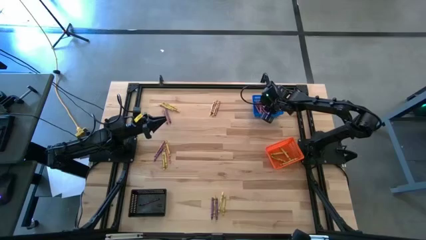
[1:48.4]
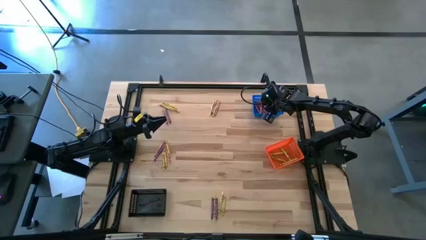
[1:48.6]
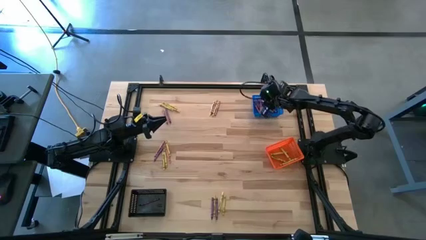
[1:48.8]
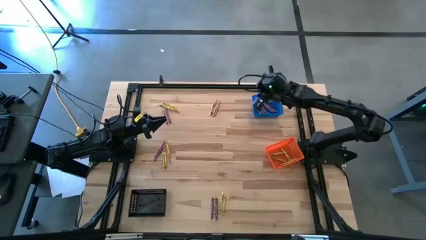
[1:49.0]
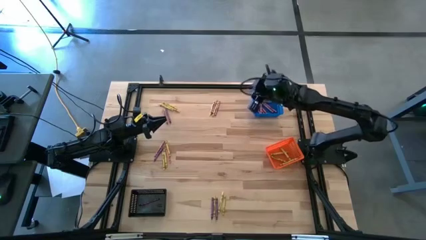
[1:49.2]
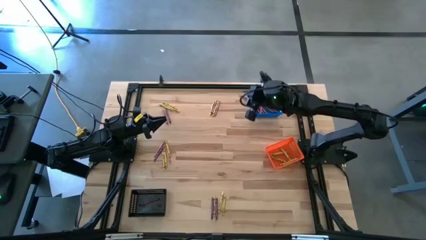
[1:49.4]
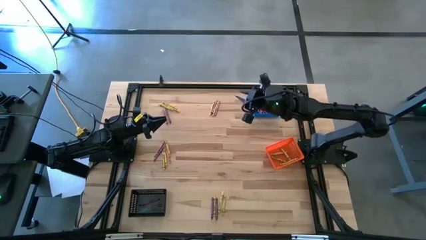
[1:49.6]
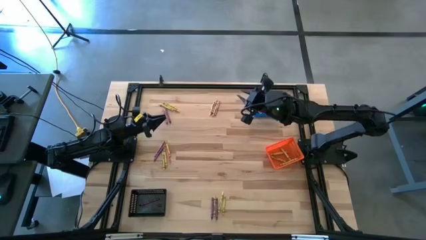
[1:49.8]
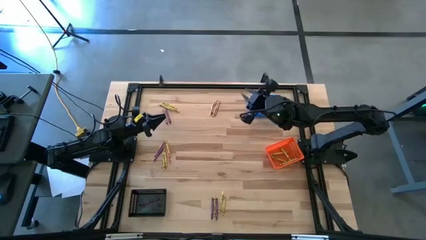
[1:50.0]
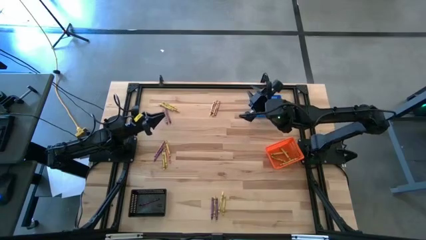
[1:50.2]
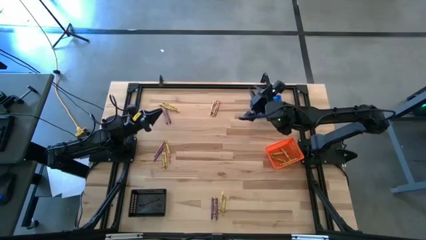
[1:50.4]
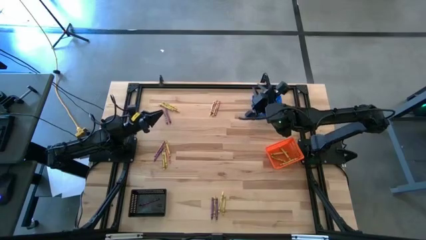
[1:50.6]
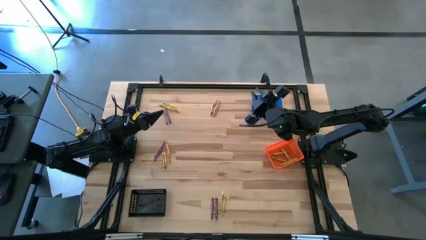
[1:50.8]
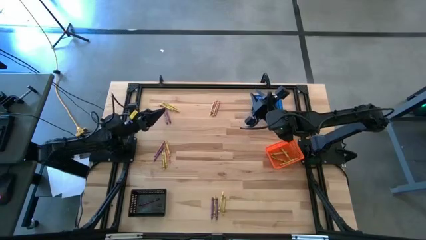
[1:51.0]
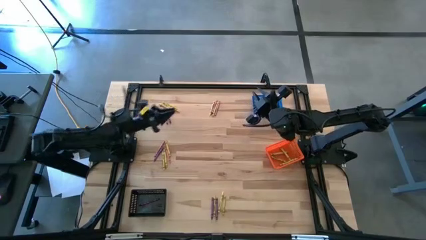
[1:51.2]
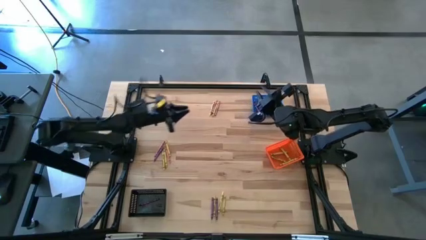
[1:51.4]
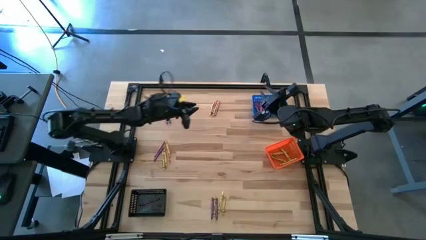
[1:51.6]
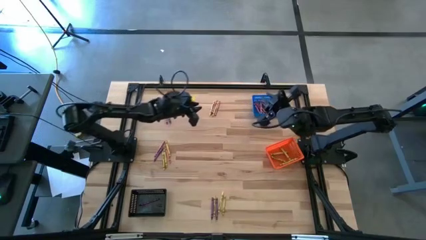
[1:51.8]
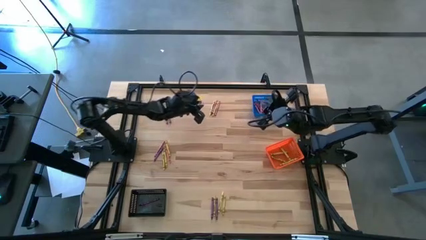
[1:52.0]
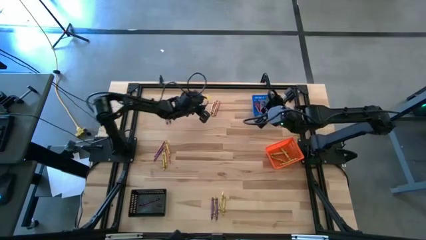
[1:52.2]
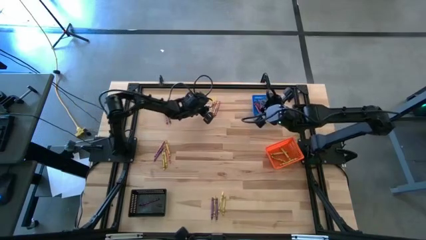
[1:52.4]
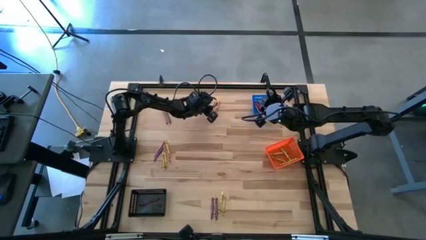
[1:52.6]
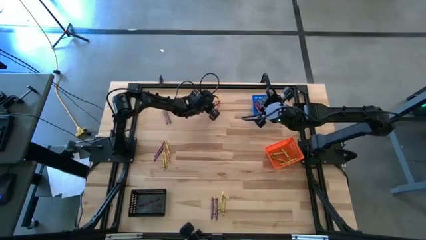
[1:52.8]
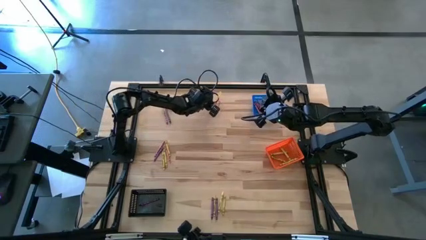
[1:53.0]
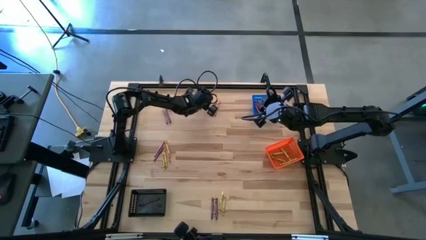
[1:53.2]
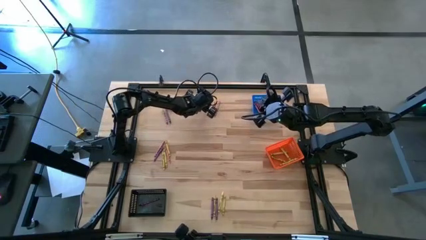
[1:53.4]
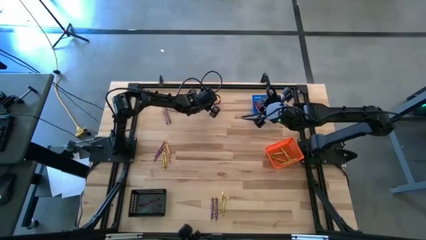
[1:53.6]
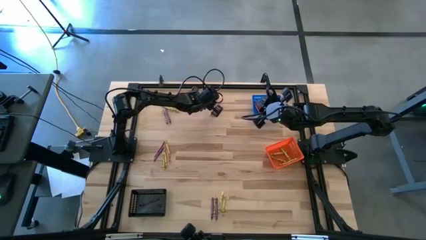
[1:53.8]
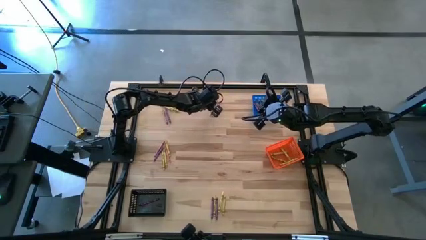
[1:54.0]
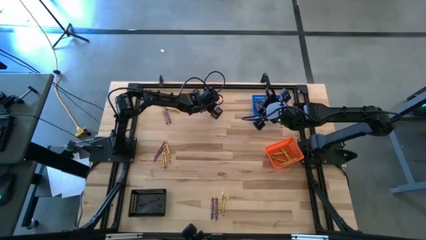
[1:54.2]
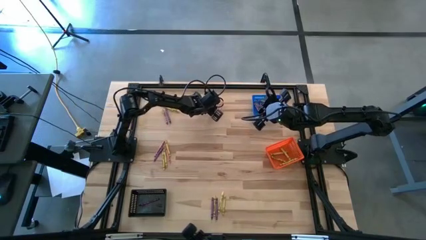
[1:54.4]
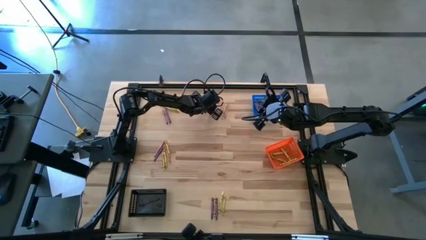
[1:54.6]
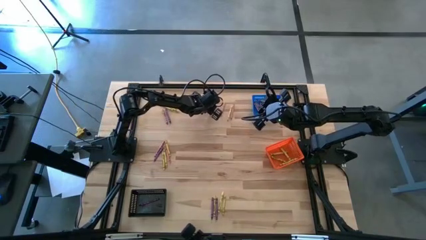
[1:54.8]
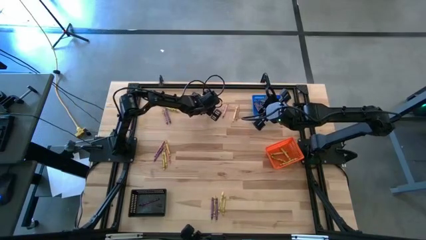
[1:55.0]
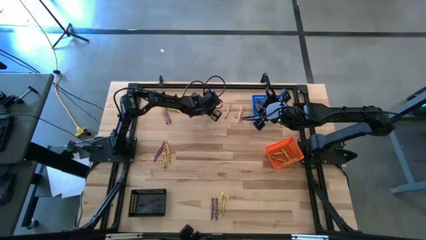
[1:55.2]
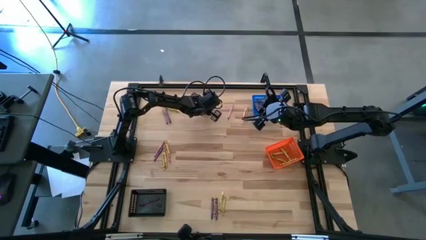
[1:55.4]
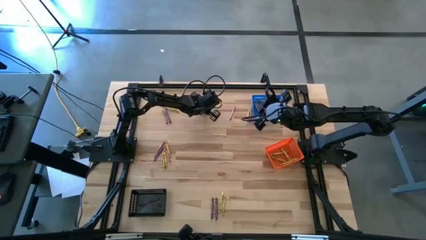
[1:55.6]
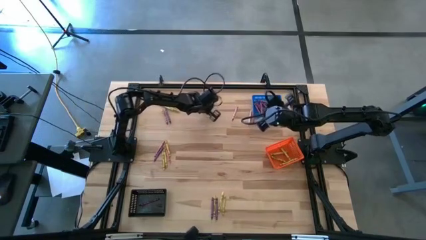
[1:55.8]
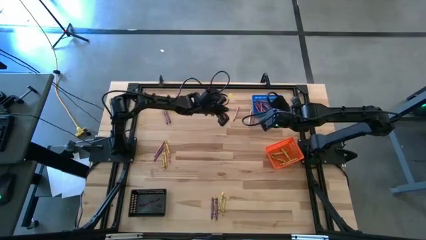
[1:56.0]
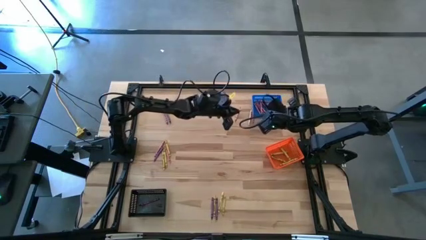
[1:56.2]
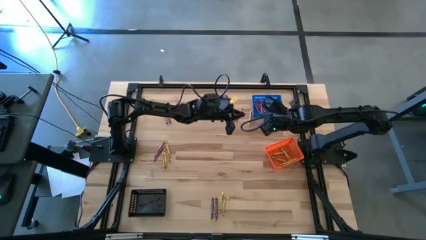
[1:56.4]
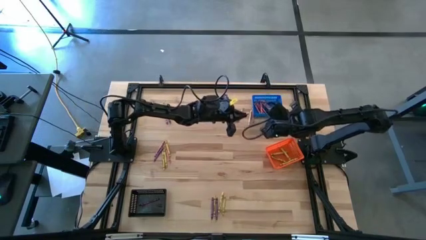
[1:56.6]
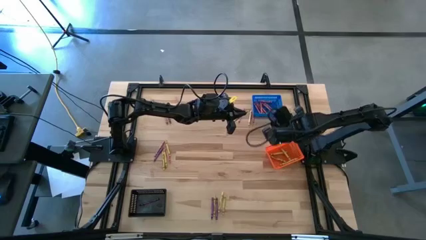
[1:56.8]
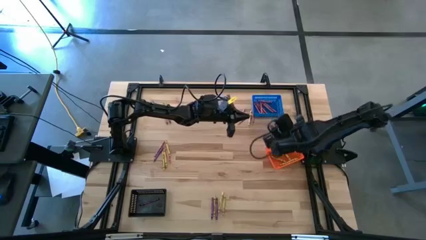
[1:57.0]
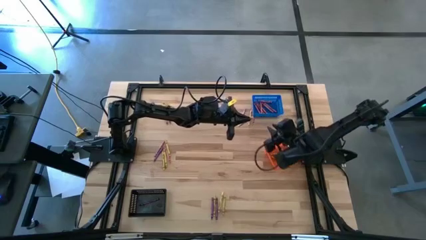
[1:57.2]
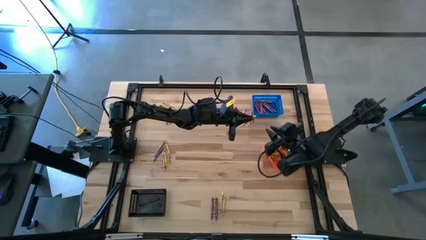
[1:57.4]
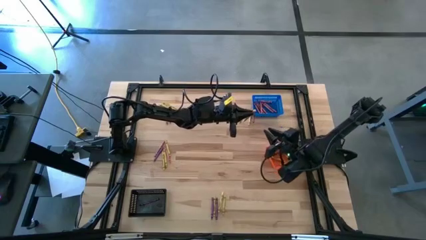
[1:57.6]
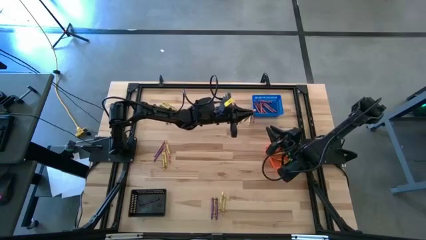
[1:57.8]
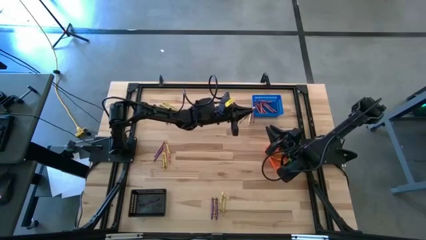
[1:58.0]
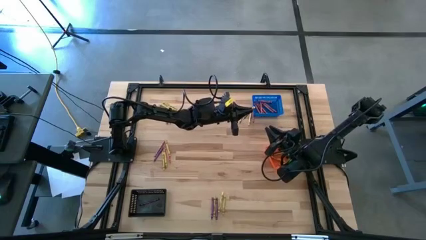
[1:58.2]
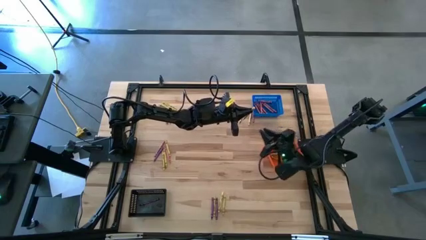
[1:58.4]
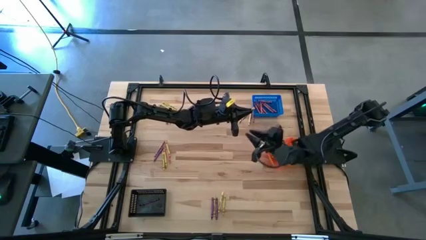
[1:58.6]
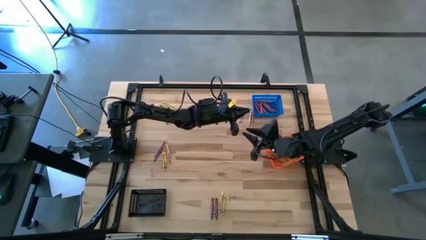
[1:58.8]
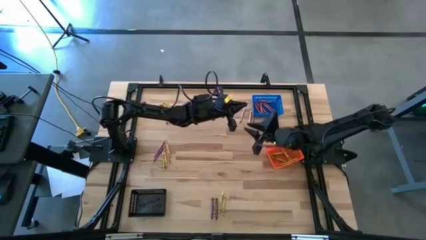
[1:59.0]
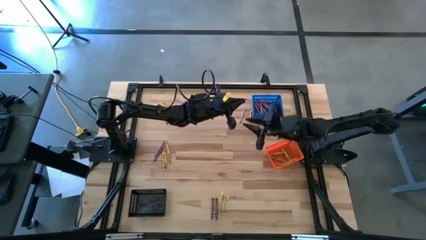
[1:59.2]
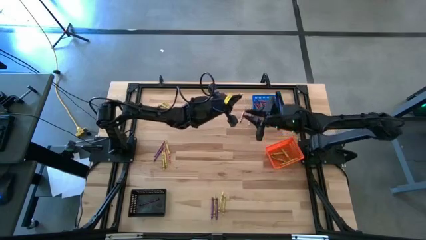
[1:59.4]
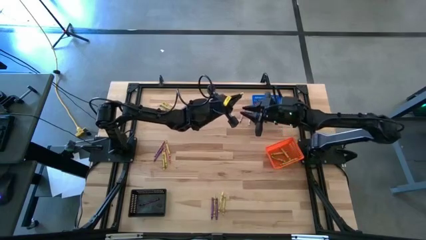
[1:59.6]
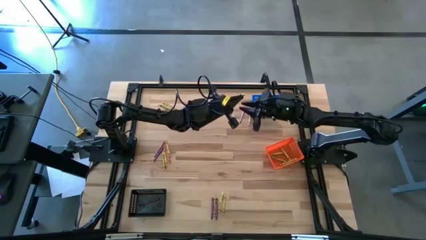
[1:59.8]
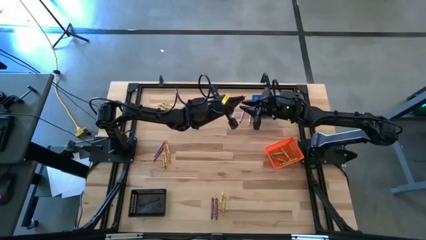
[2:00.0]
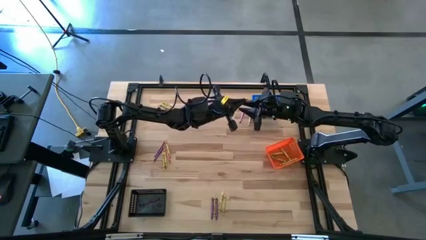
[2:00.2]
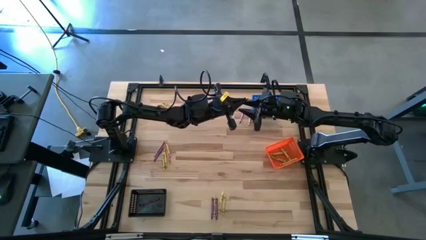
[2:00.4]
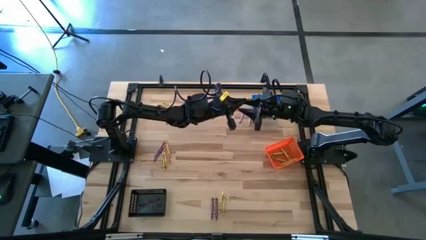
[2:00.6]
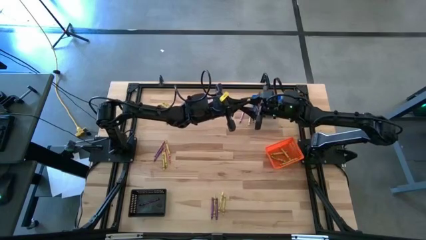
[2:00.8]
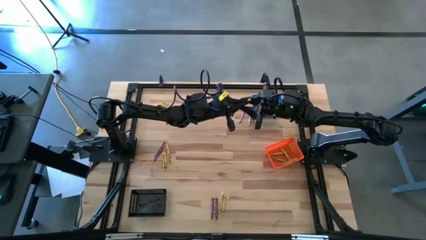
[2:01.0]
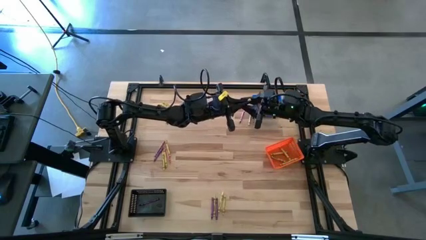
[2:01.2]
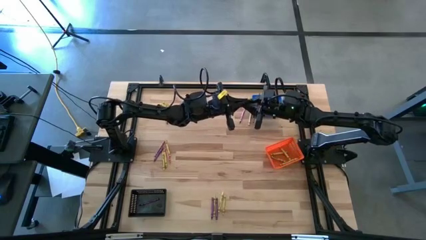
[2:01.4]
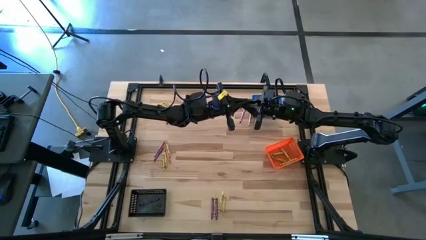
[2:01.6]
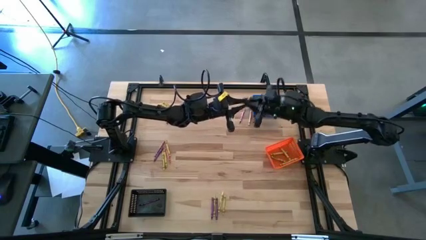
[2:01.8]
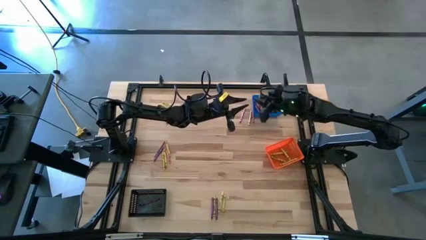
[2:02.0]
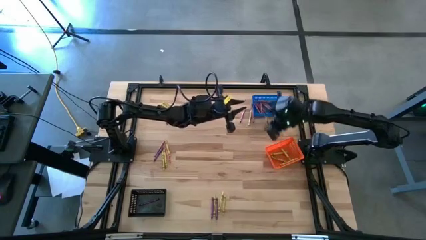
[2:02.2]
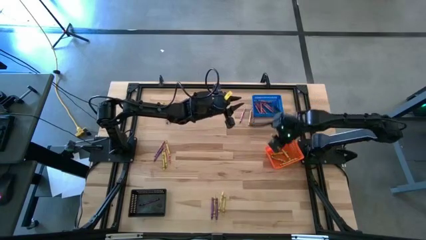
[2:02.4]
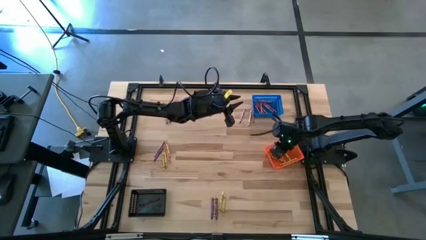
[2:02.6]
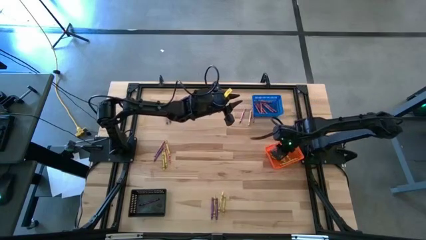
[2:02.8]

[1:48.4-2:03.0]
Task: Sort crayons
Put the yellow crayon into the orange basket

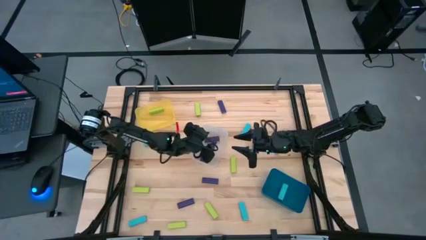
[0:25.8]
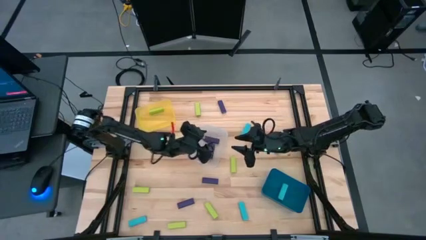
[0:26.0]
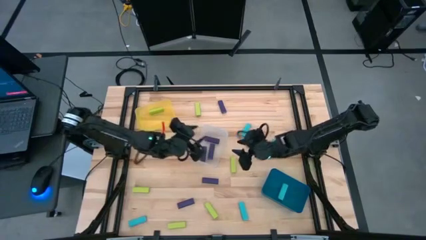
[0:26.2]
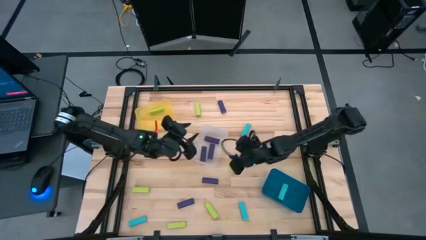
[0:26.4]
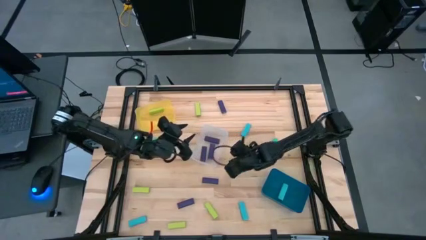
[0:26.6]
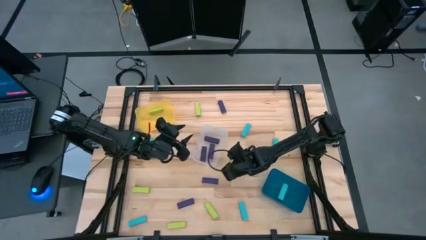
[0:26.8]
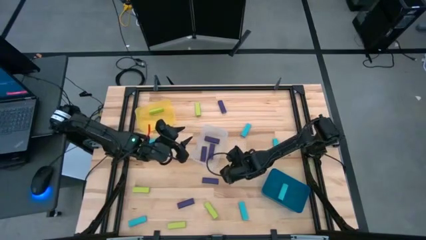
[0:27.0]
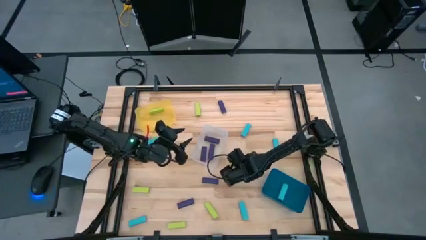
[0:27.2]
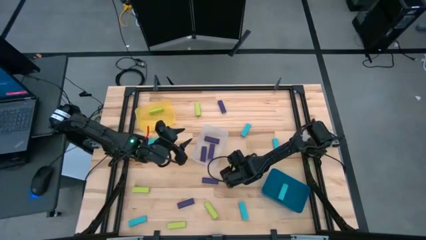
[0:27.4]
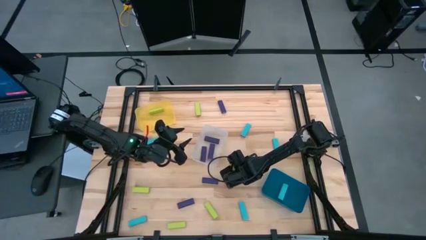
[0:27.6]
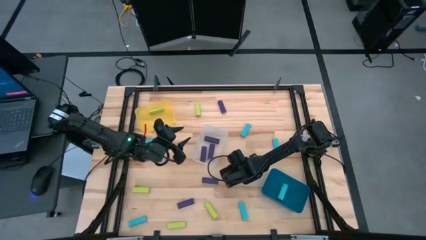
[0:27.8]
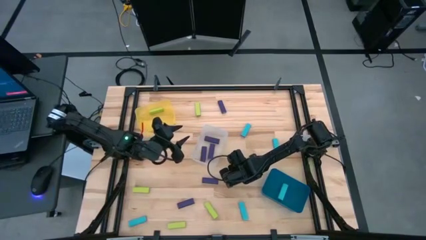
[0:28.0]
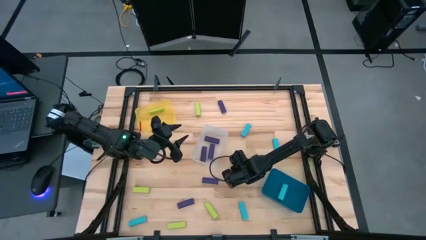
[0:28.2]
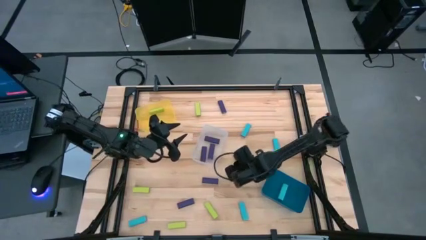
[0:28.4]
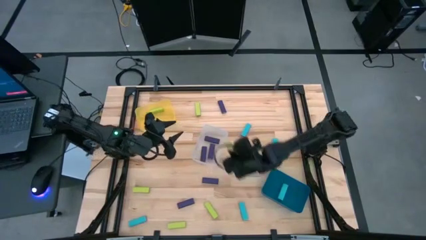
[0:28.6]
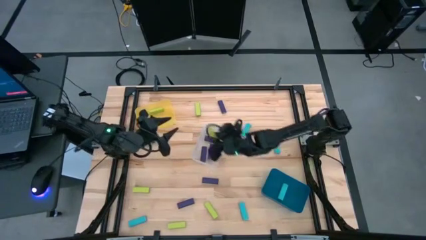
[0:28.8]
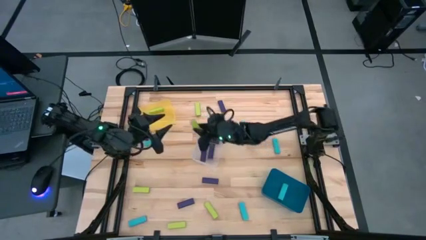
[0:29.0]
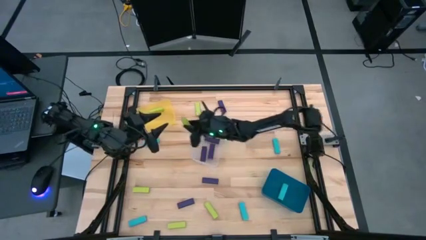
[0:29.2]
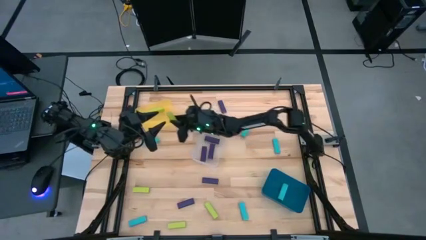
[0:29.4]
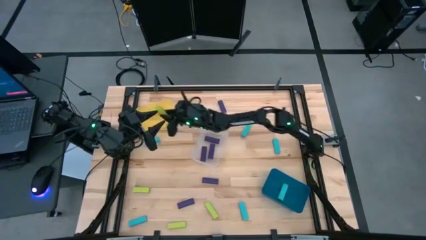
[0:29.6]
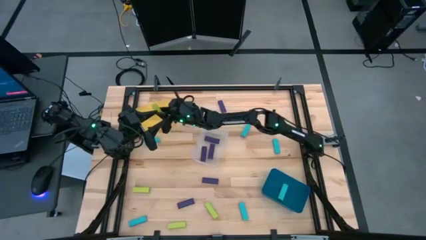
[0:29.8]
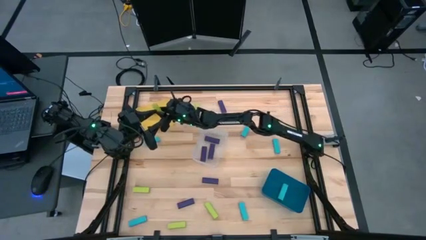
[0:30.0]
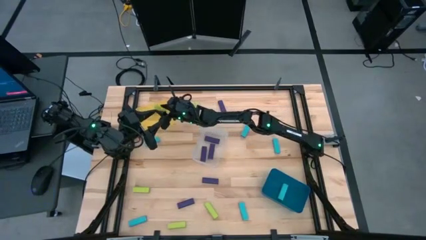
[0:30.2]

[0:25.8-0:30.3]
Task: Sort blocks
Put the green block into the yellow bin
